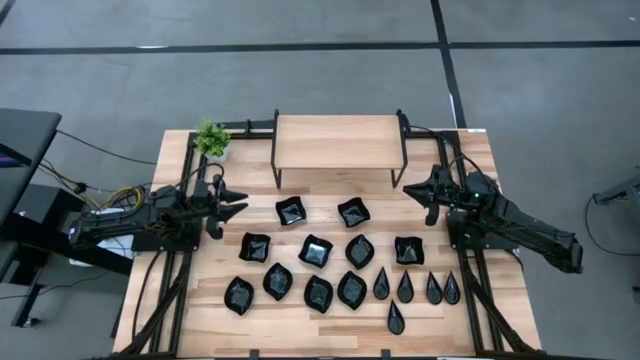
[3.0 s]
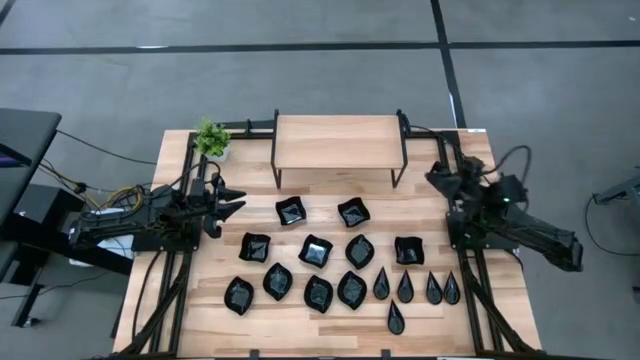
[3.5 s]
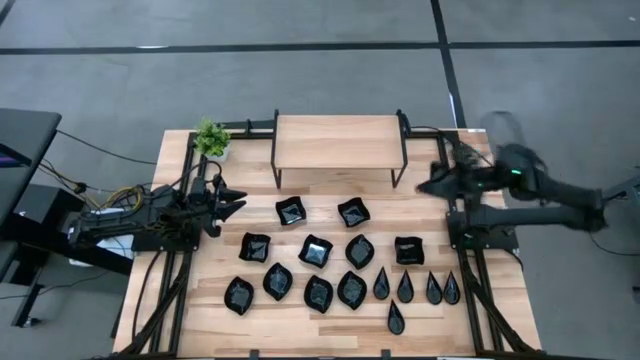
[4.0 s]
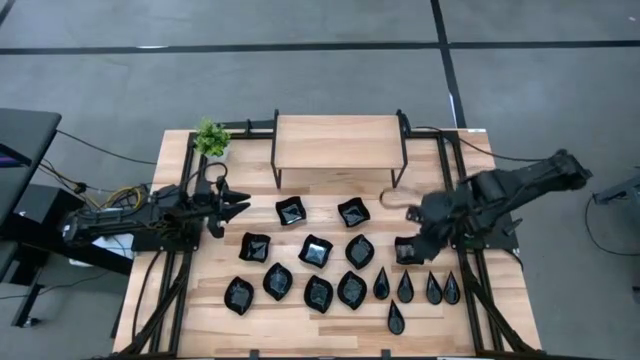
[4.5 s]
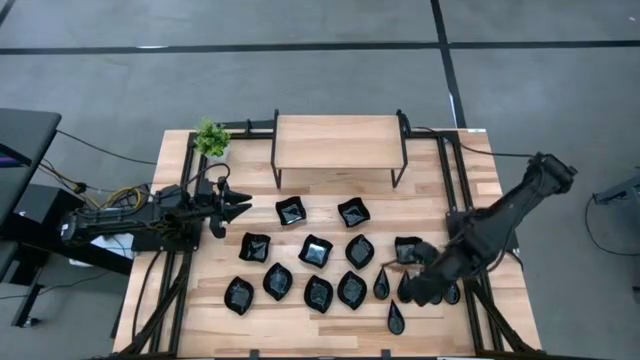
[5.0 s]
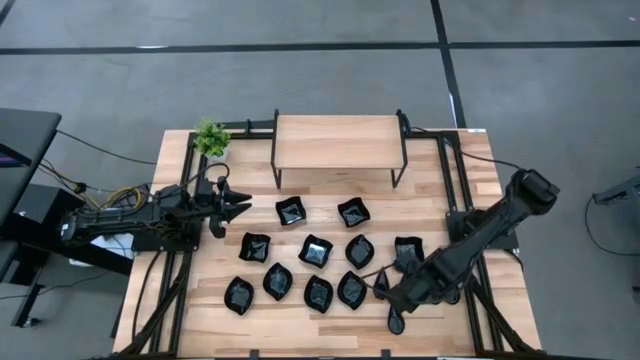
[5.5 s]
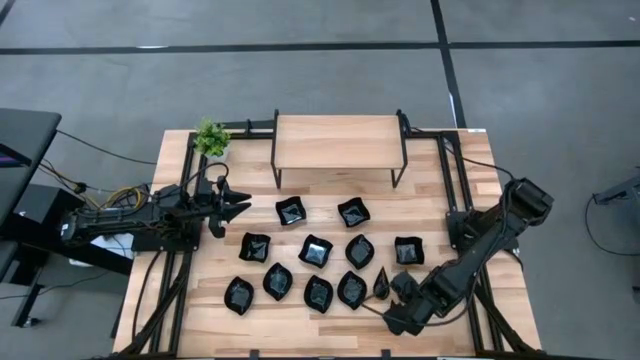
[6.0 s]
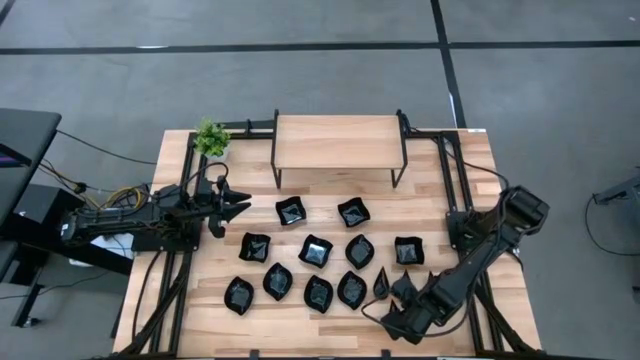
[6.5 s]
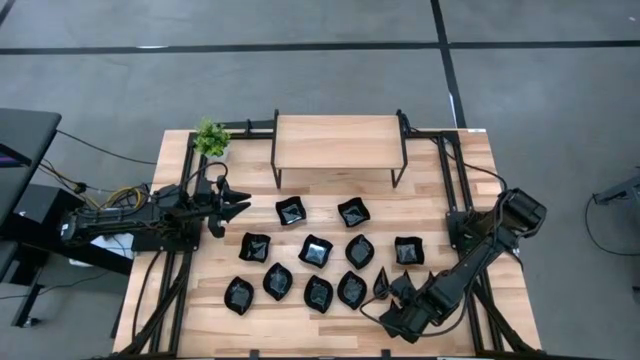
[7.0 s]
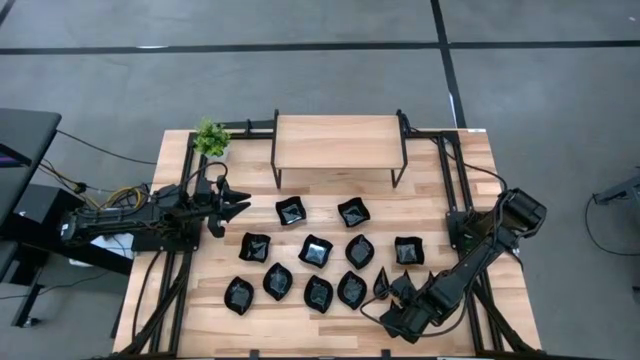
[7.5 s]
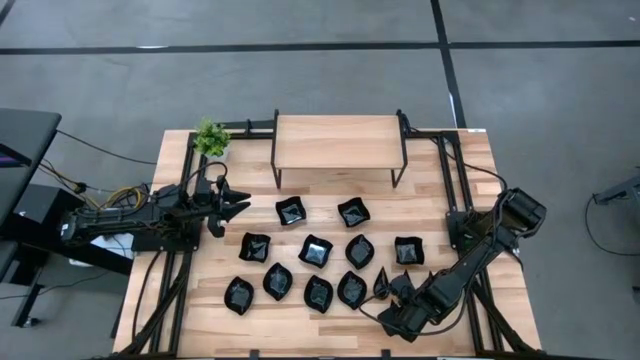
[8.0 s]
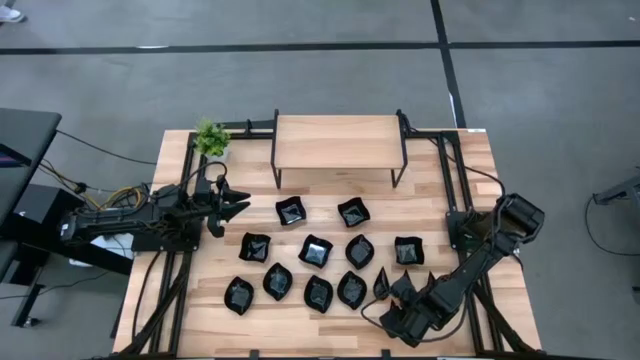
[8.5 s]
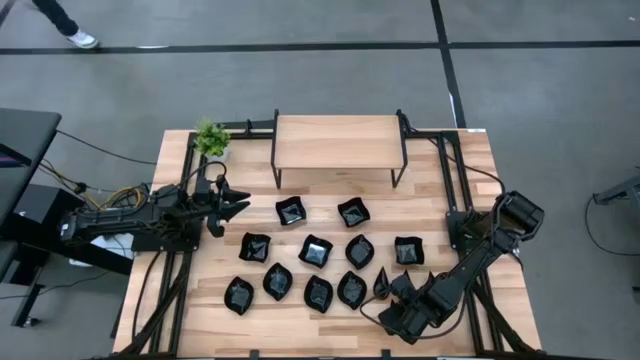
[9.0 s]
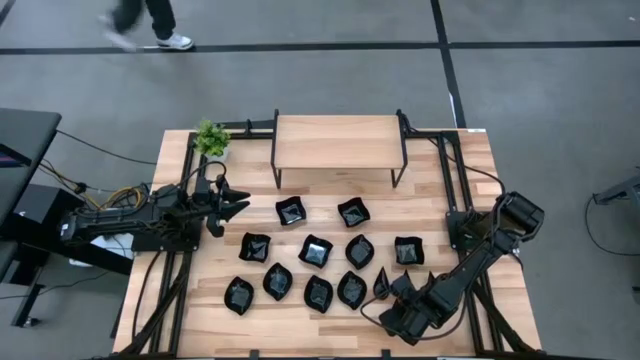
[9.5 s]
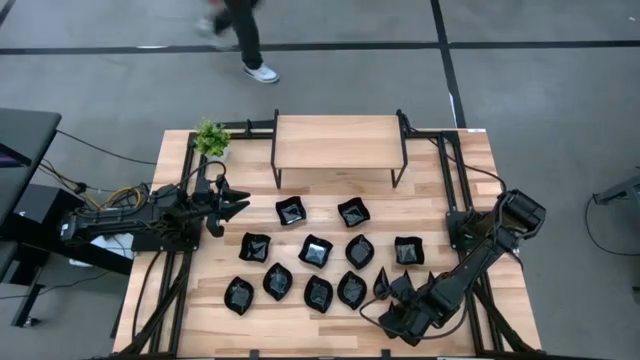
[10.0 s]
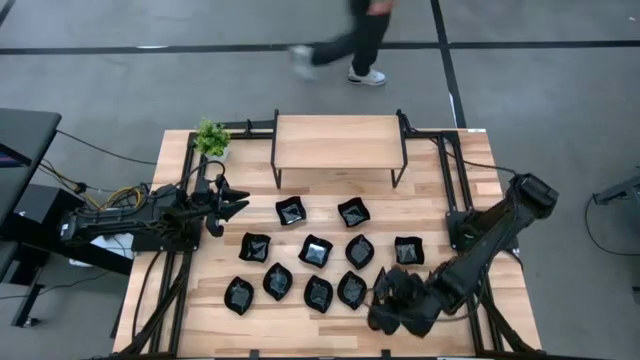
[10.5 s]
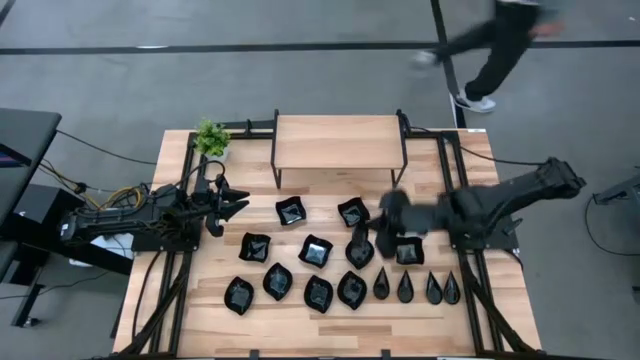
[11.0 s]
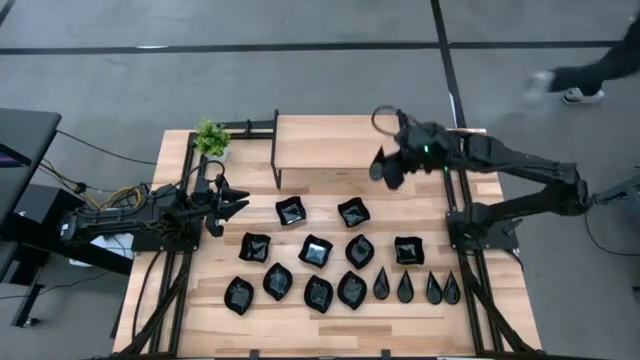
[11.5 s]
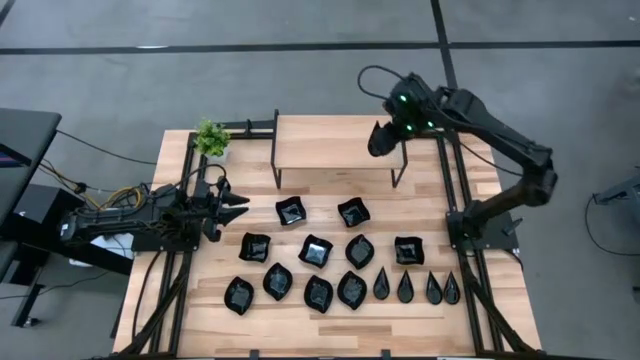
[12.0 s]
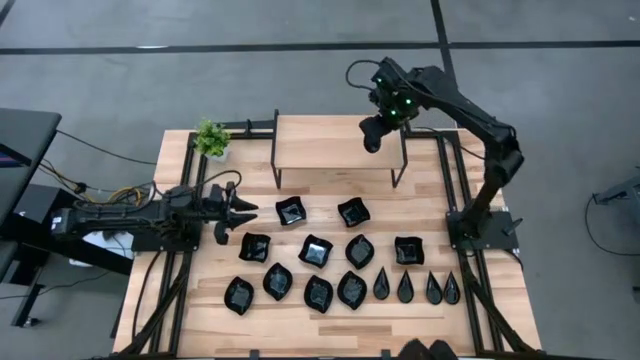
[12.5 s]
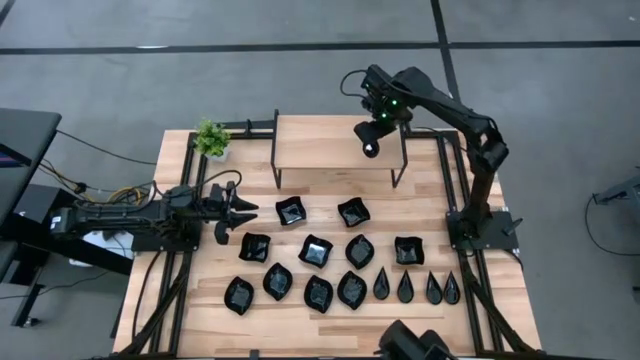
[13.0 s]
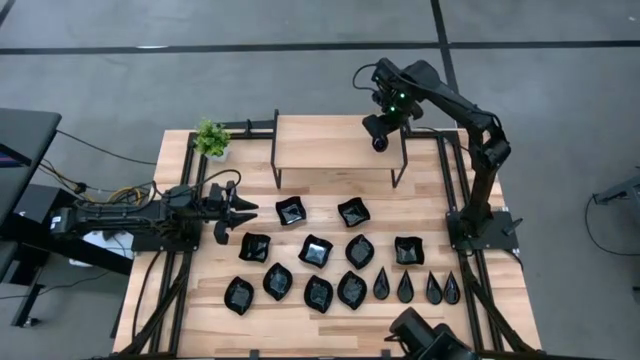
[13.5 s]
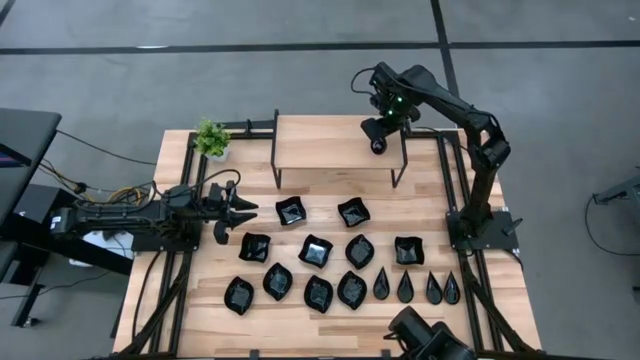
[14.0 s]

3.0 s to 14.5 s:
Task: Pick & Place Mini shaped plates
Put the drop shaped plate on the shelf

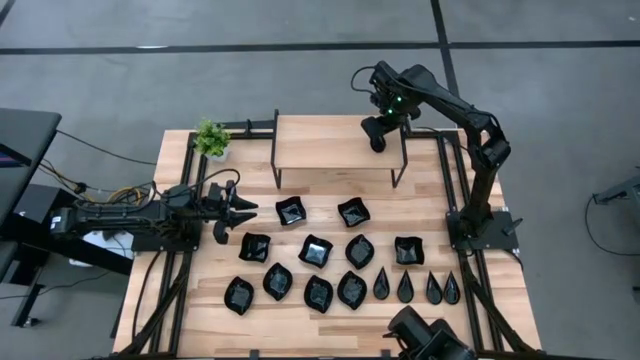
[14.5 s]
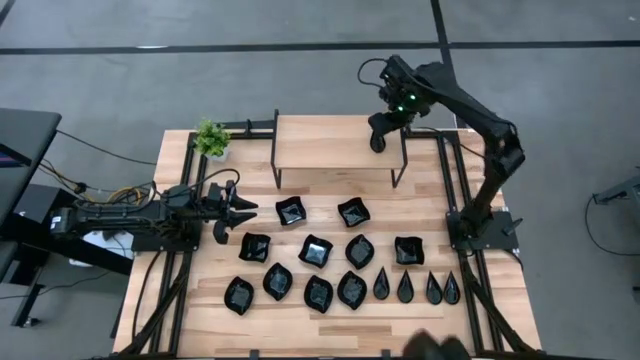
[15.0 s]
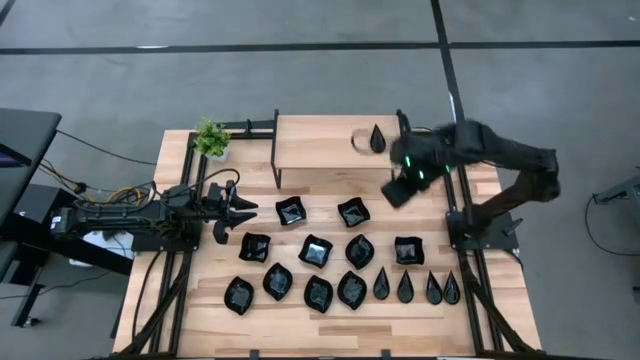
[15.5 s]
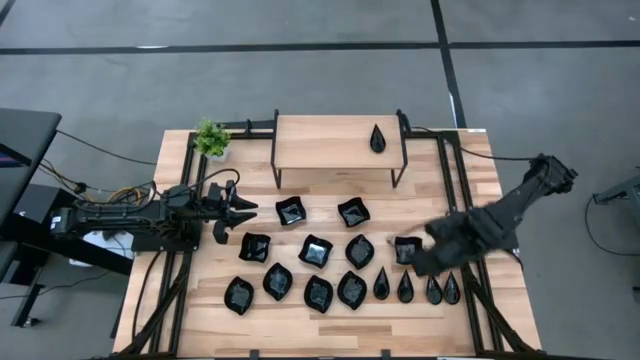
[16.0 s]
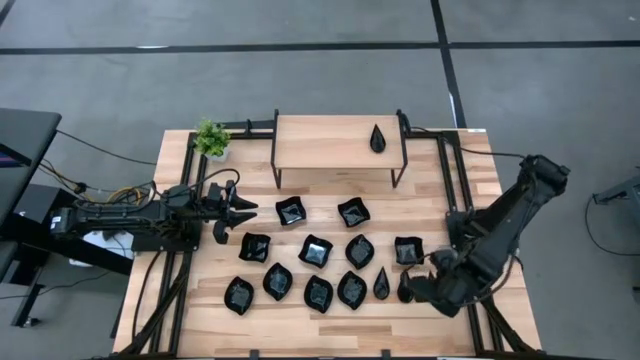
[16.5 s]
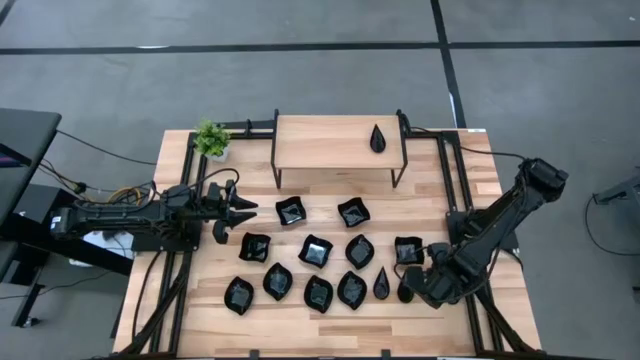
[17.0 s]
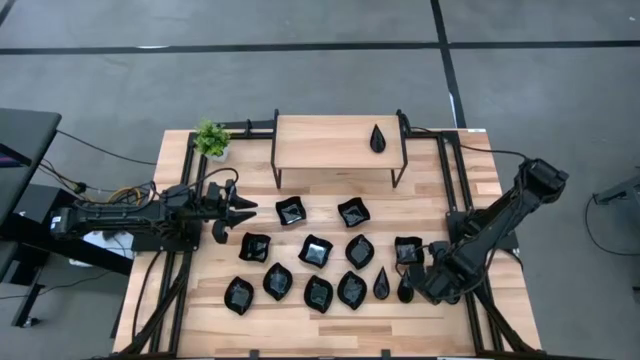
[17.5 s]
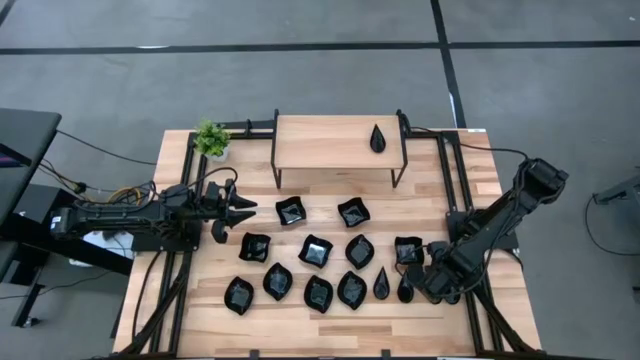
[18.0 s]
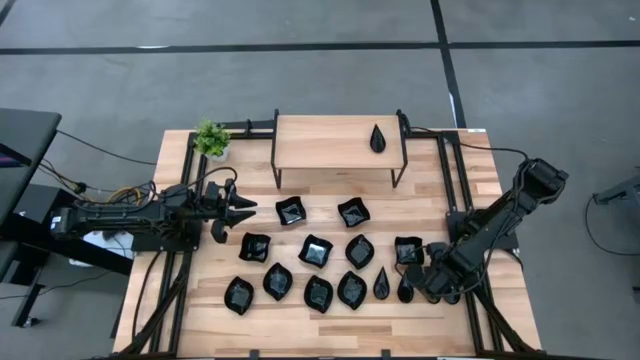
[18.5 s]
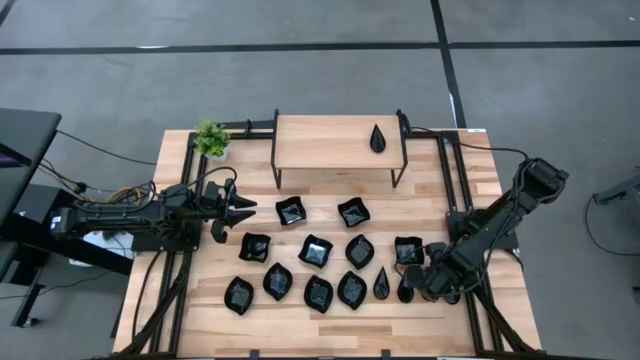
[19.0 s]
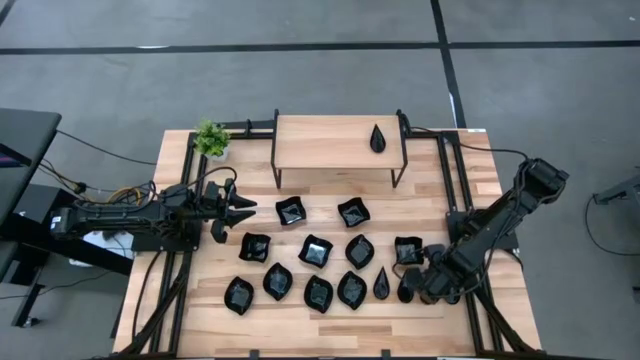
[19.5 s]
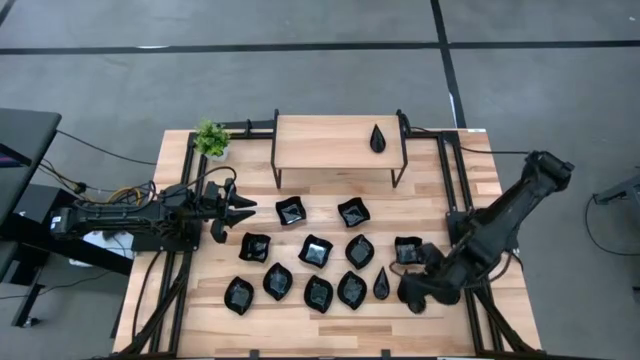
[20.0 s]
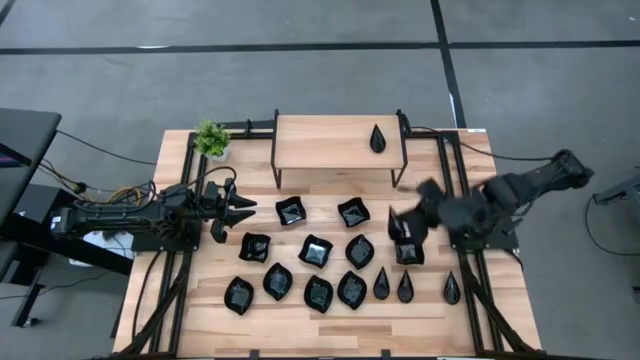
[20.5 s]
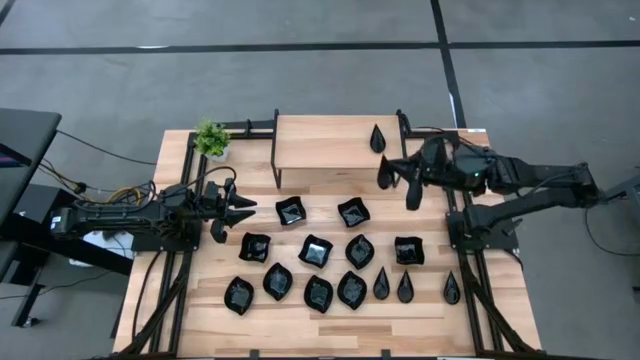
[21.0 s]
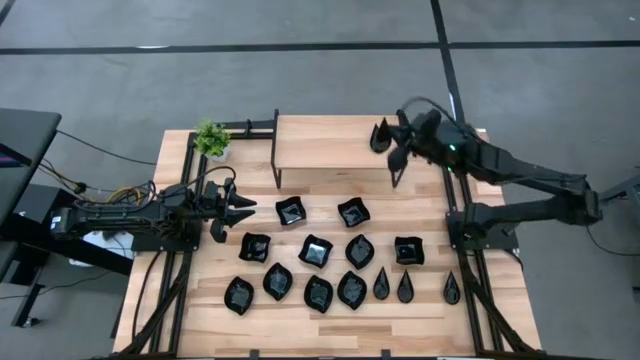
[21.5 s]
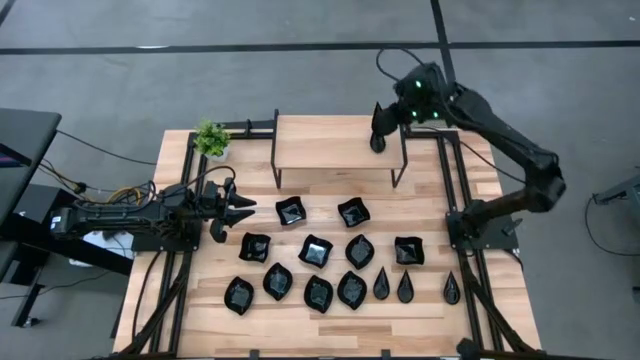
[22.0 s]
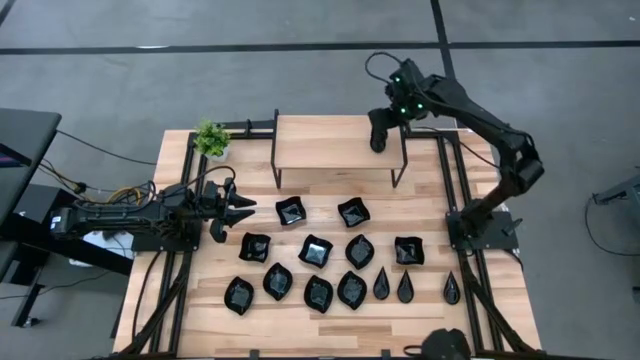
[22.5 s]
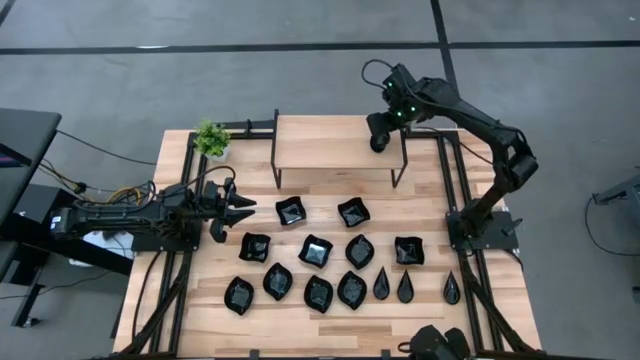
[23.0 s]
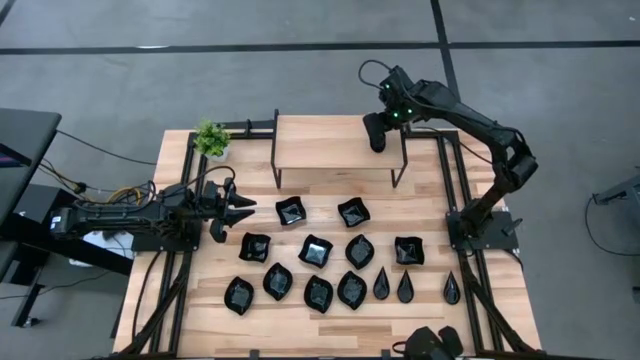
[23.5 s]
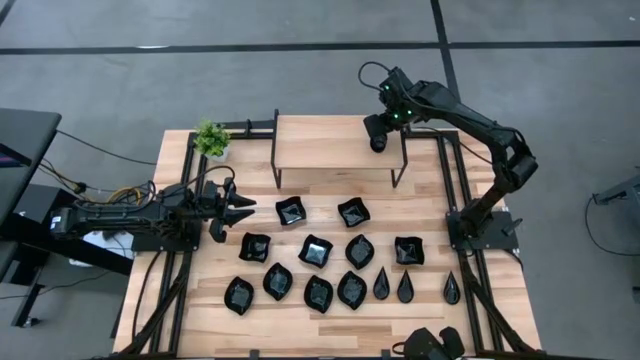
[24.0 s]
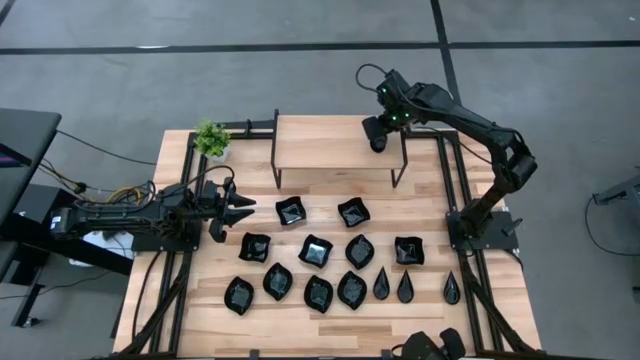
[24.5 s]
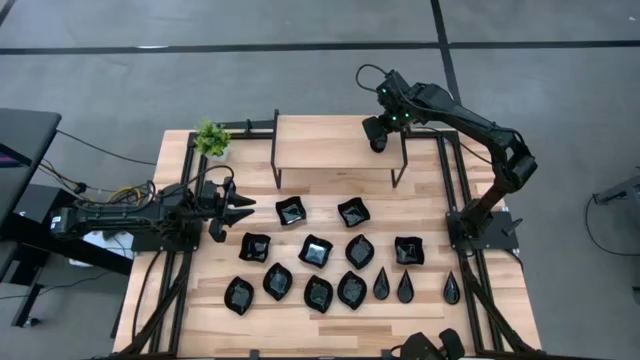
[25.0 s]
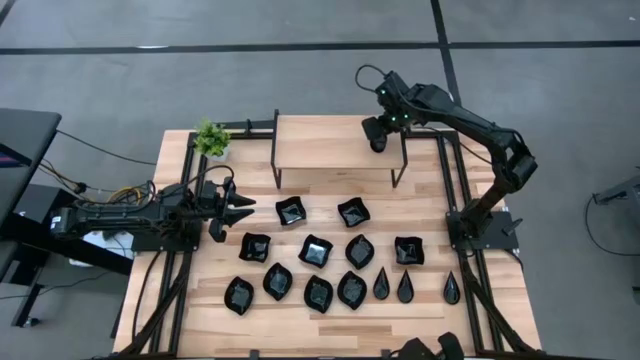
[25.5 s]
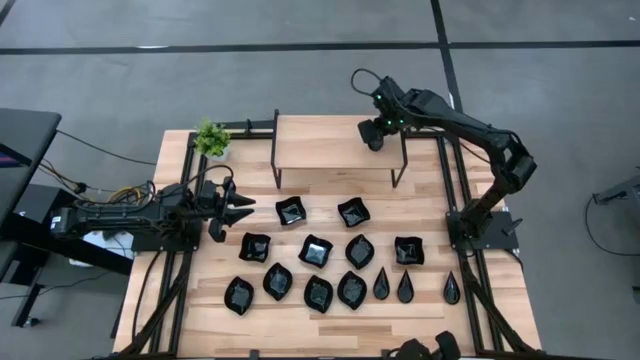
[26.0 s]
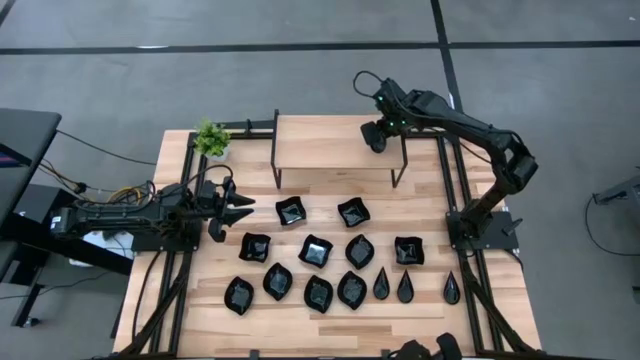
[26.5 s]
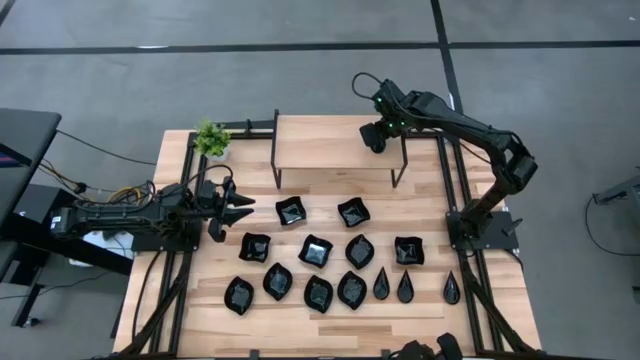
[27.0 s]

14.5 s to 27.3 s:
Stack the drop shaped plate on top of the other drop shaped plate on the shelf
